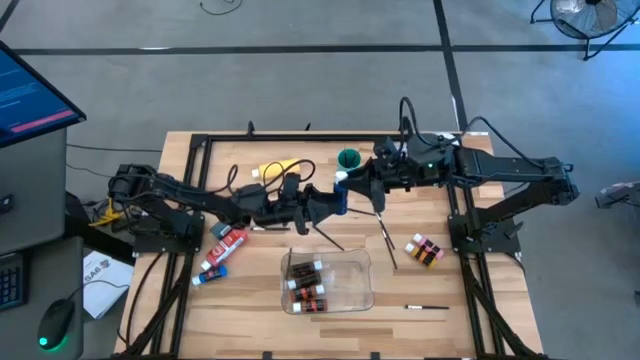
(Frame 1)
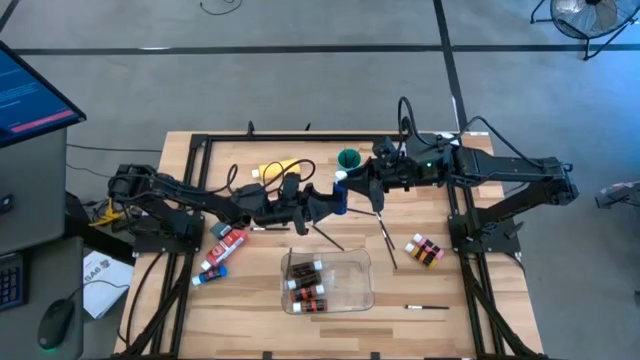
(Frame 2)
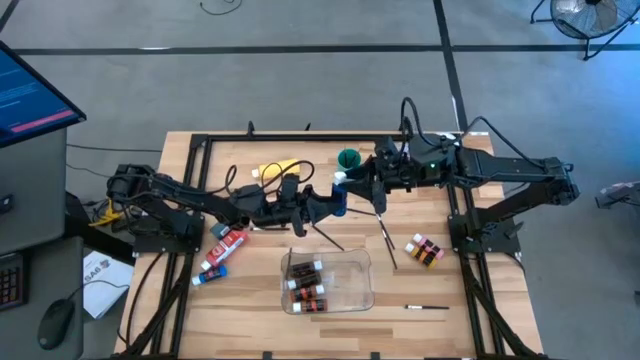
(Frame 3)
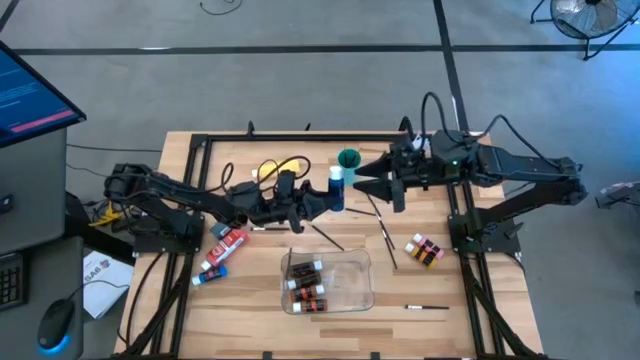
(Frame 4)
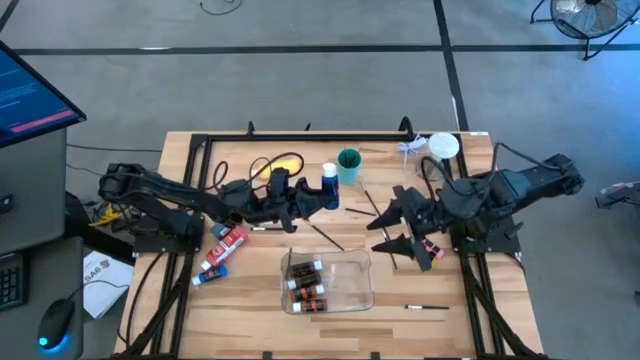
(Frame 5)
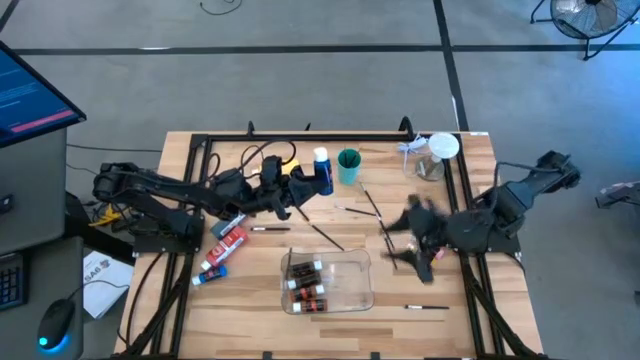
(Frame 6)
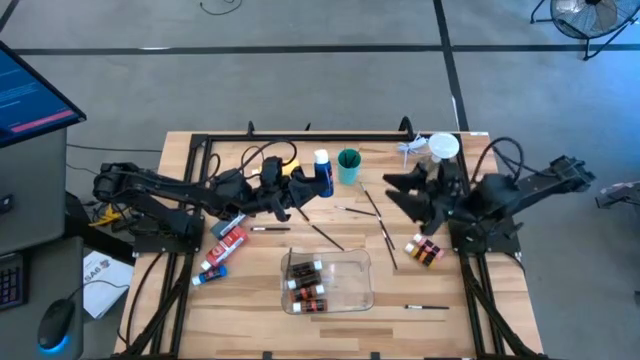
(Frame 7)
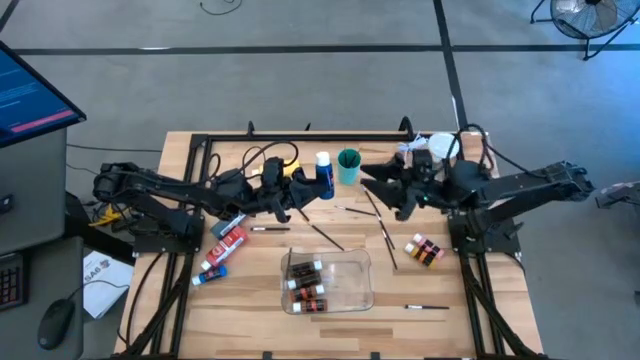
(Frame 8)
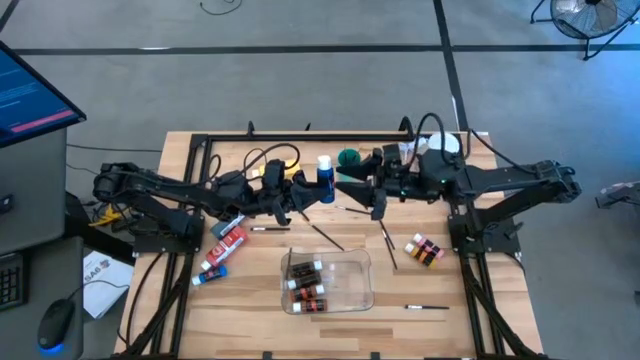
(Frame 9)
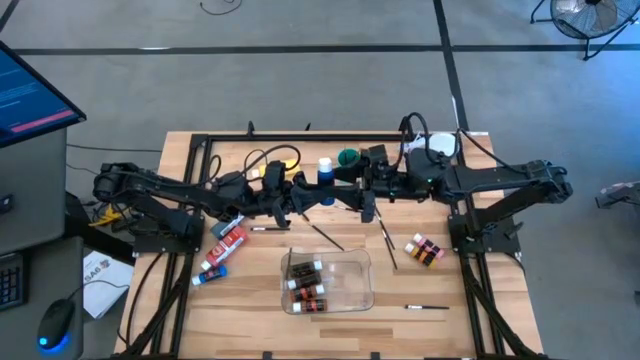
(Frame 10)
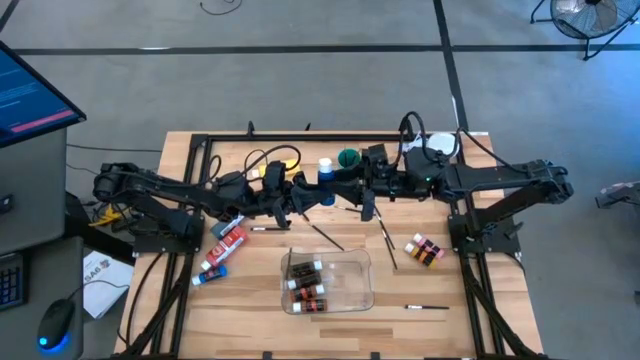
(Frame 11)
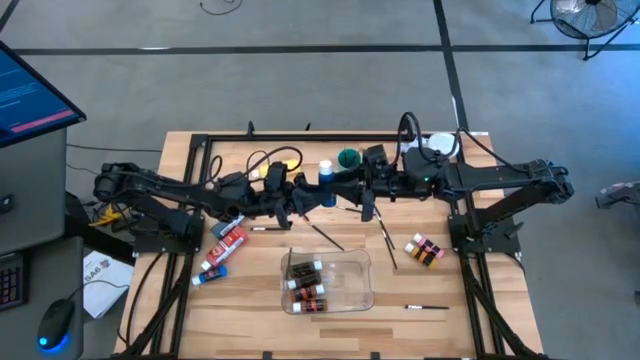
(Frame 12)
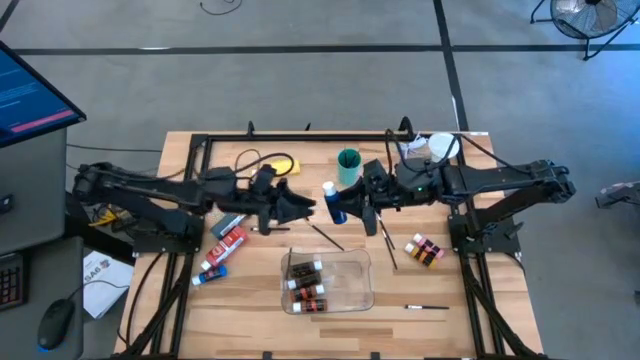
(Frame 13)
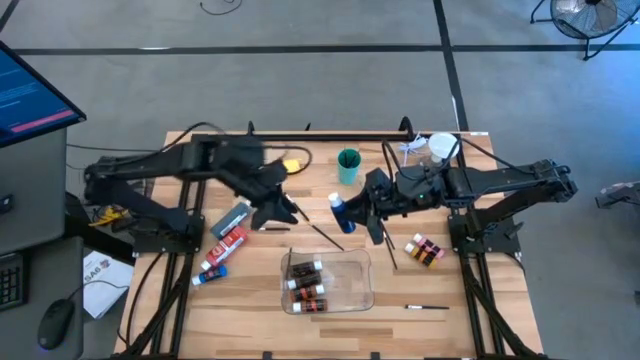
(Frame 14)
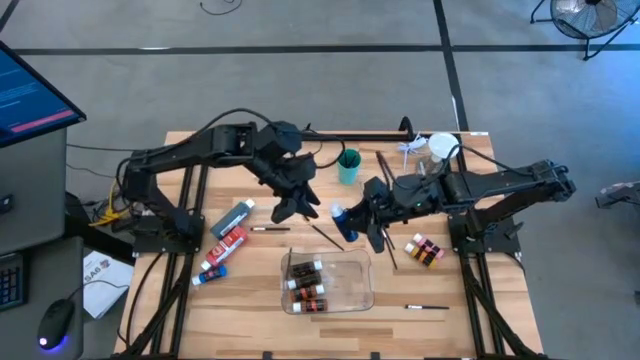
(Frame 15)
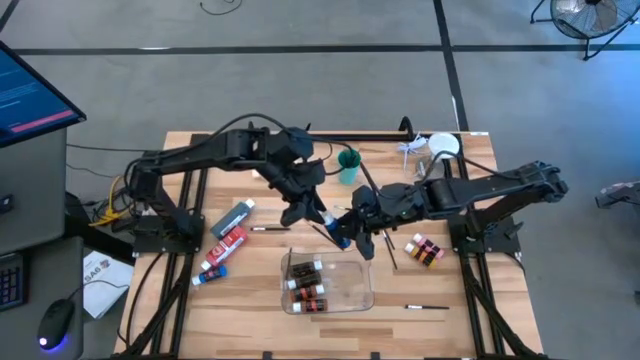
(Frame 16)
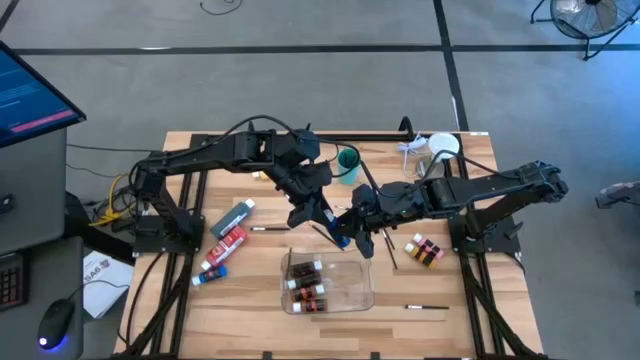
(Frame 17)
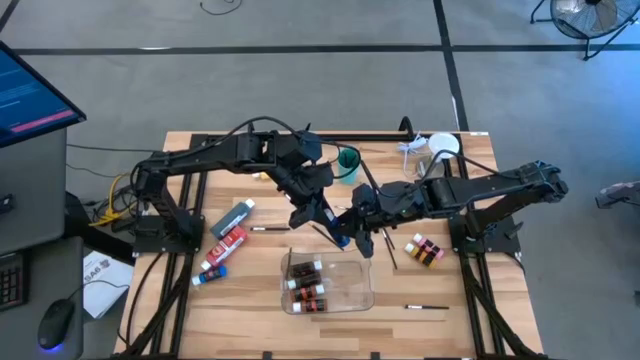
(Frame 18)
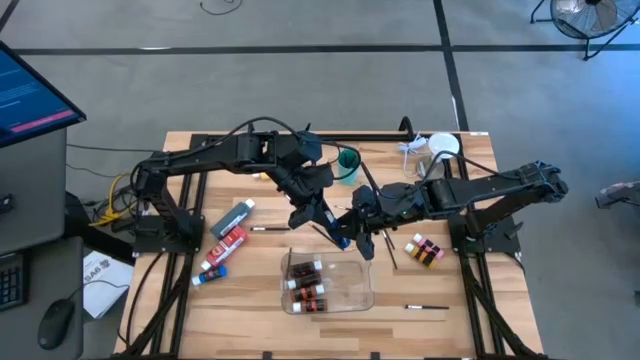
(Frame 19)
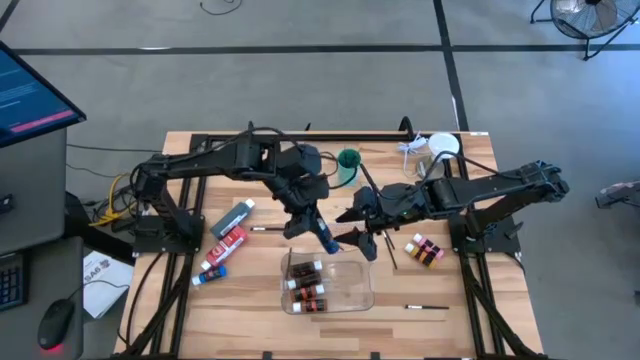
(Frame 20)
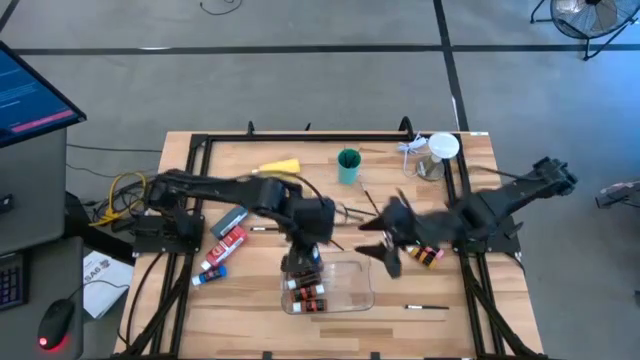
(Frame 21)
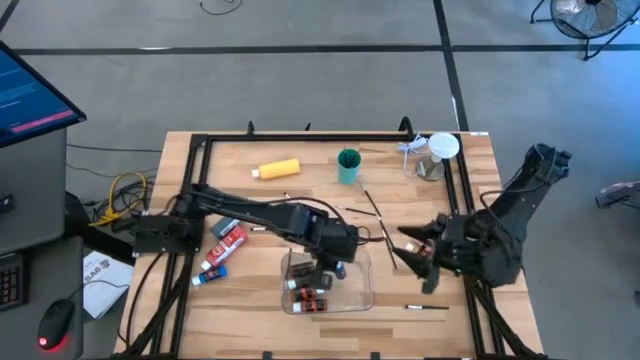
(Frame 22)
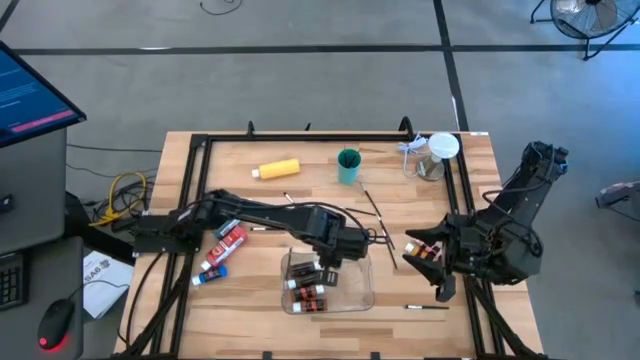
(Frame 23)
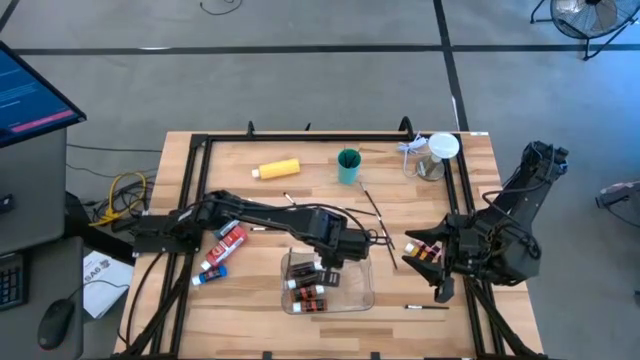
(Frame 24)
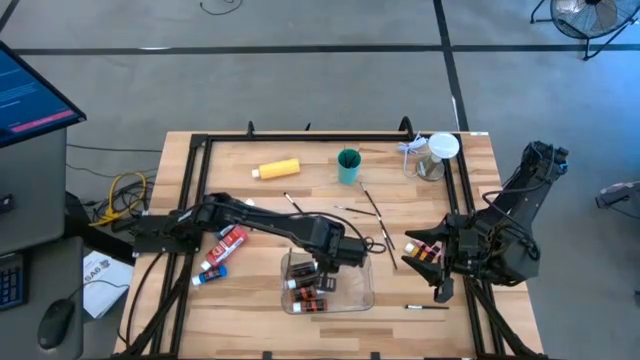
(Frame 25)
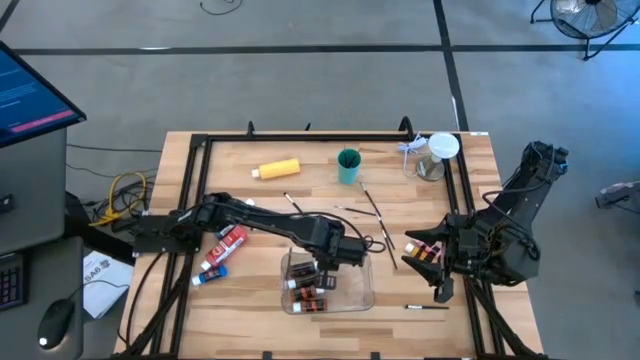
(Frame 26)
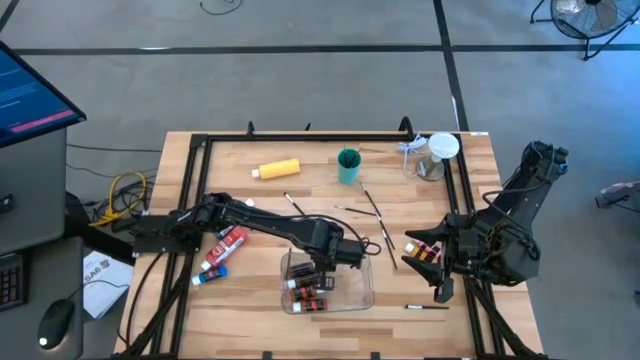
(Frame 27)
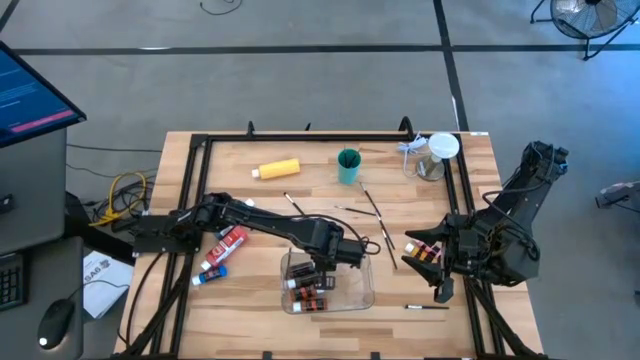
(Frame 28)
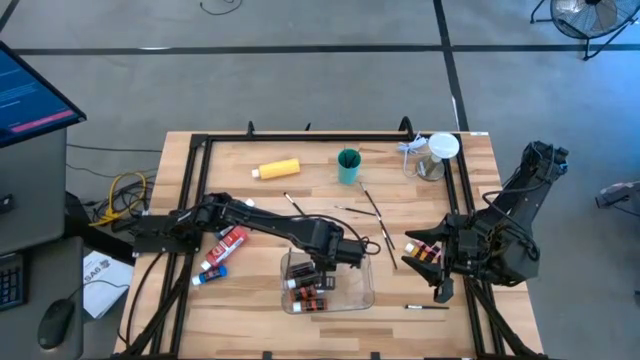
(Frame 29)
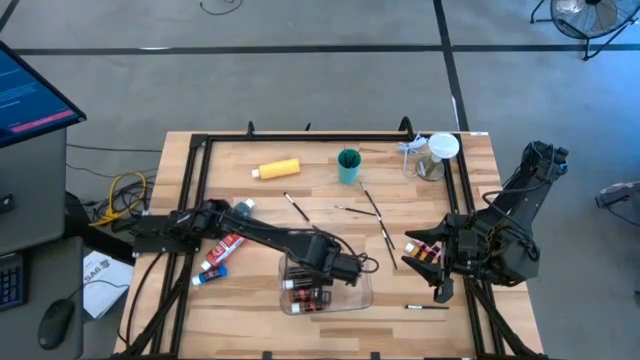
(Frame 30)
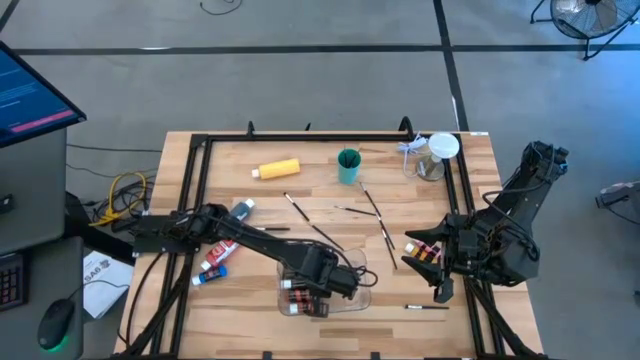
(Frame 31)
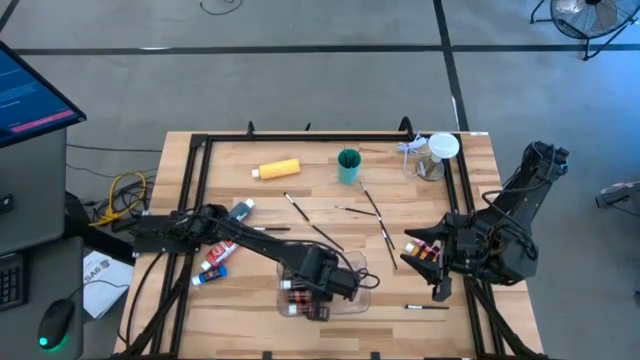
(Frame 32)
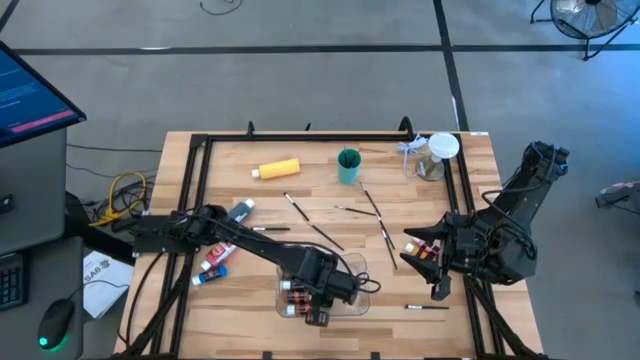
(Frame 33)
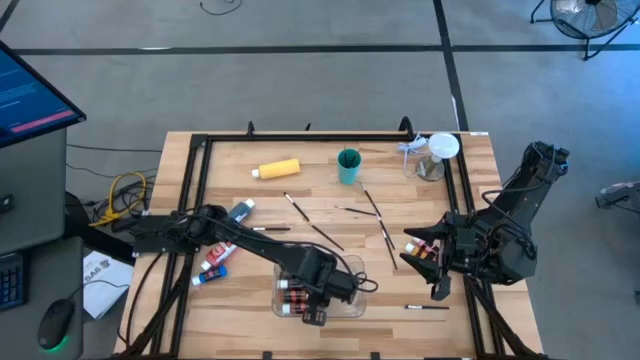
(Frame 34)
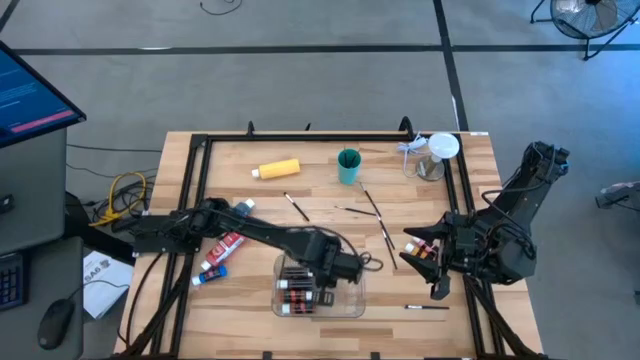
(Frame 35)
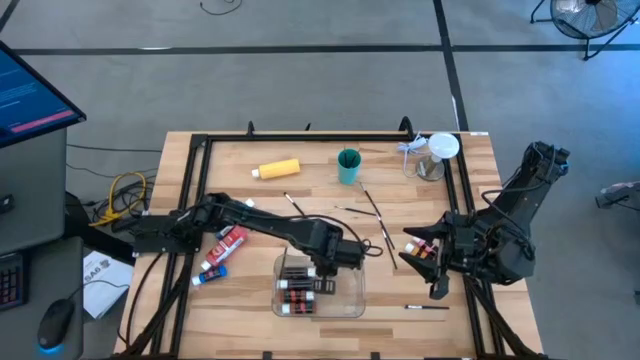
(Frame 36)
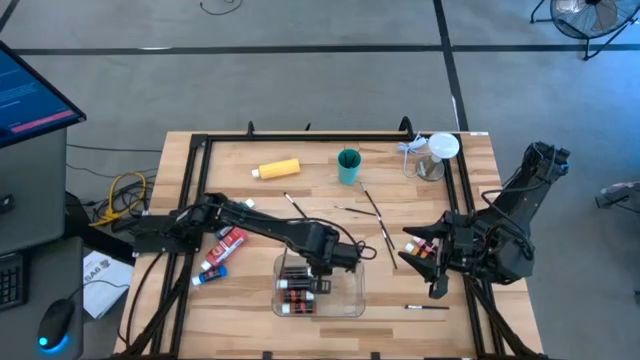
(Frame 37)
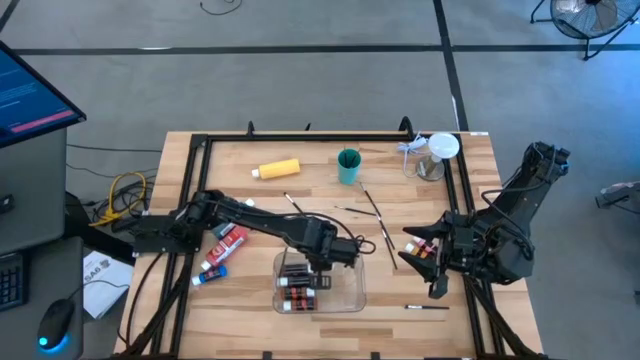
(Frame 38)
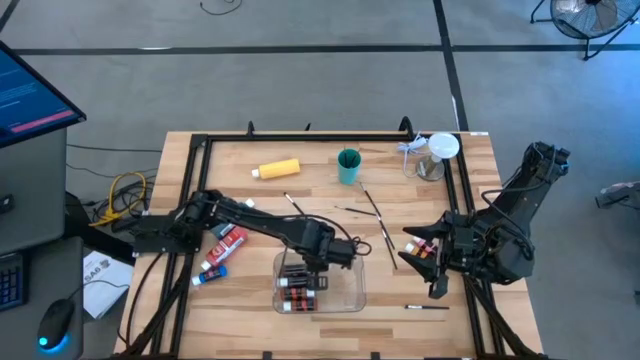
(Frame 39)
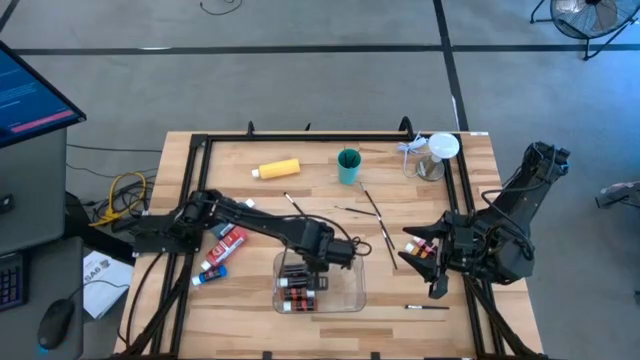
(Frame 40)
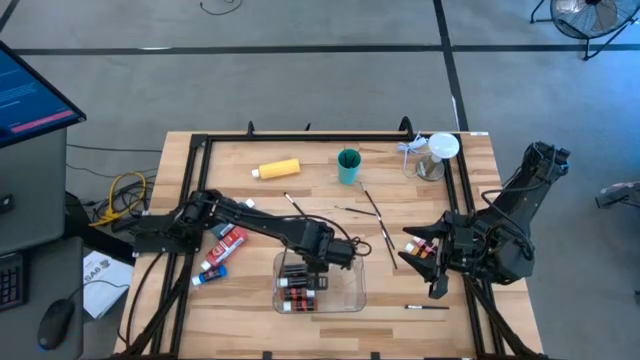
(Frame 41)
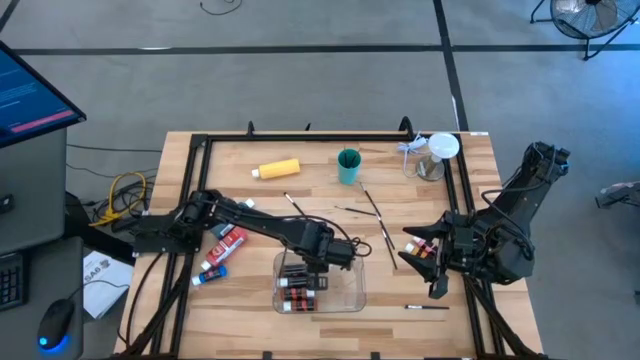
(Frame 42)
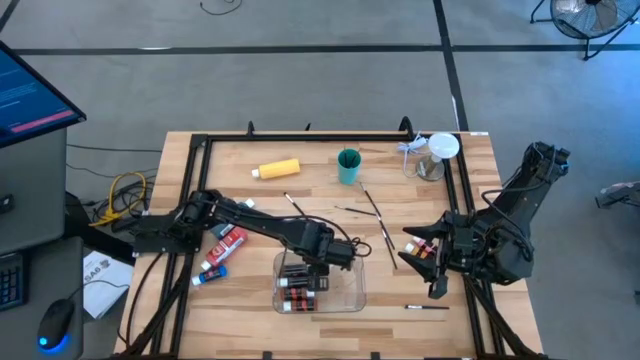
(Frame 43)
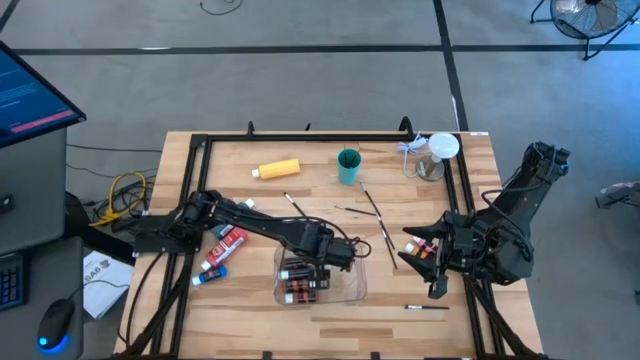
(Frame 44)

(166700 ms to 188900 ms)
Task: Pick & Place Paint Supplies
Put the blue paint bottle into the transparent bin
